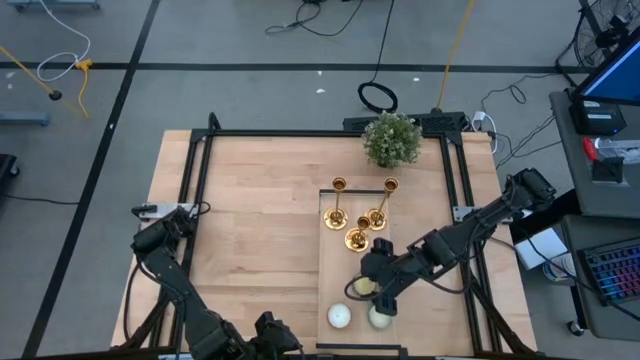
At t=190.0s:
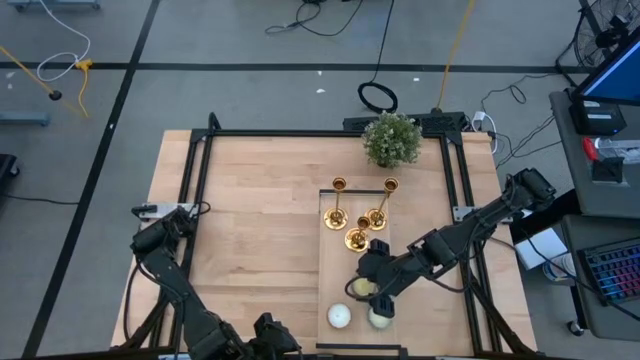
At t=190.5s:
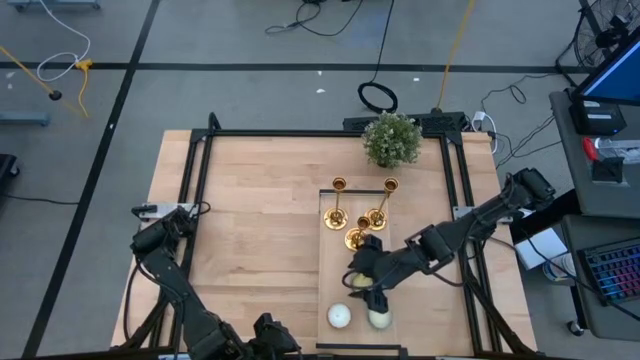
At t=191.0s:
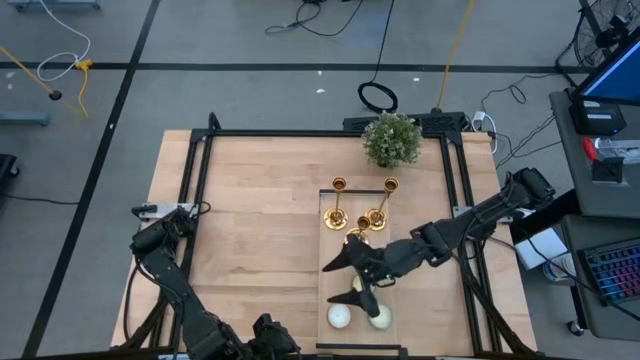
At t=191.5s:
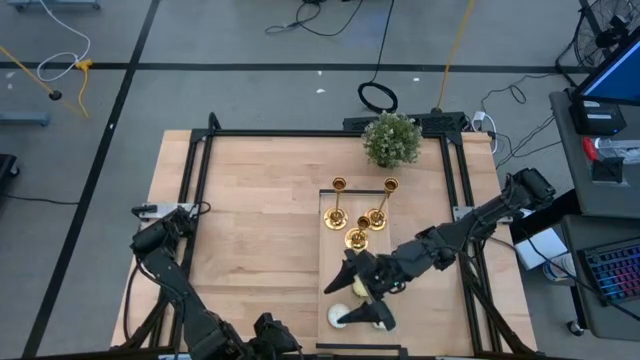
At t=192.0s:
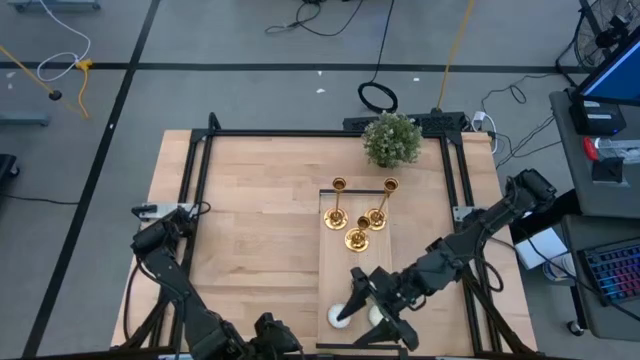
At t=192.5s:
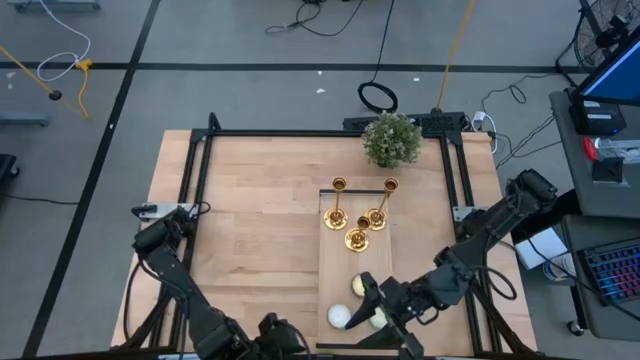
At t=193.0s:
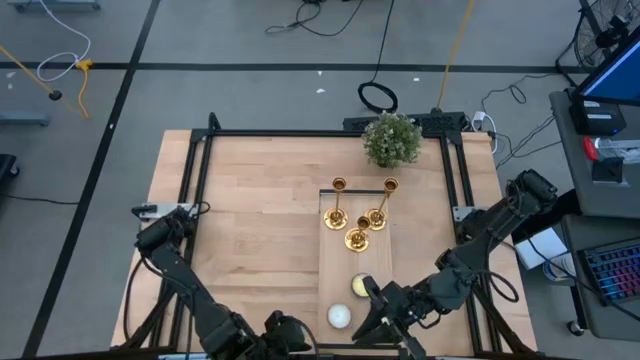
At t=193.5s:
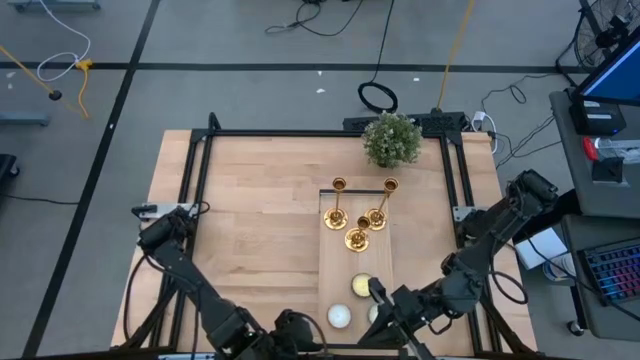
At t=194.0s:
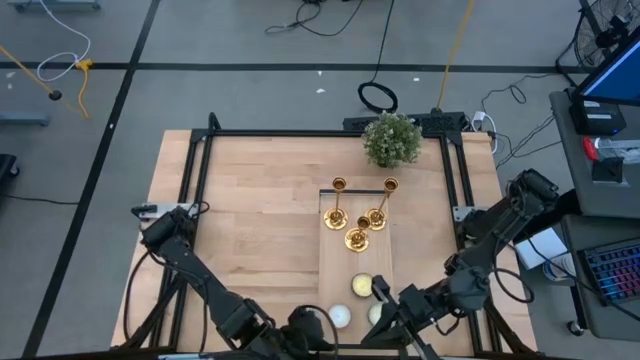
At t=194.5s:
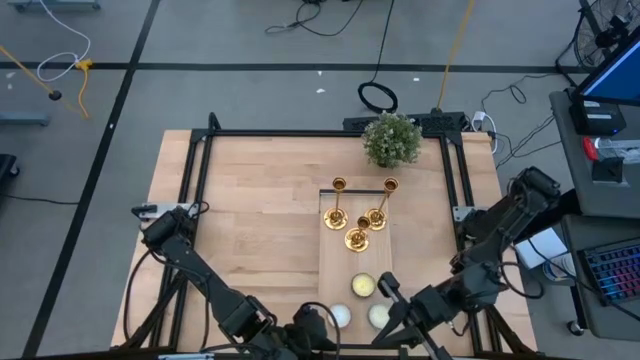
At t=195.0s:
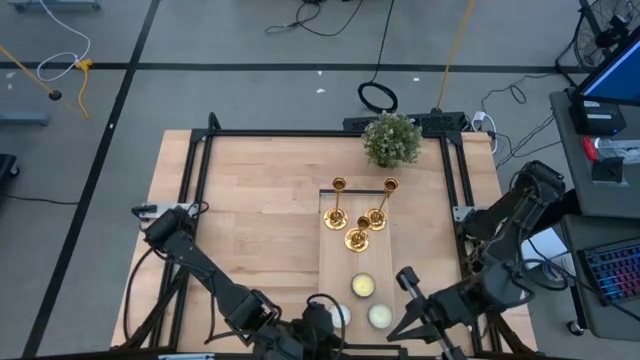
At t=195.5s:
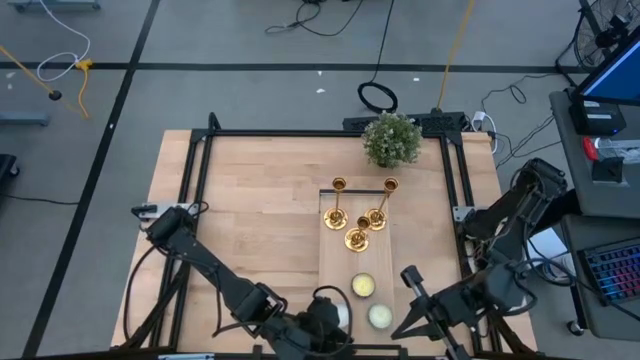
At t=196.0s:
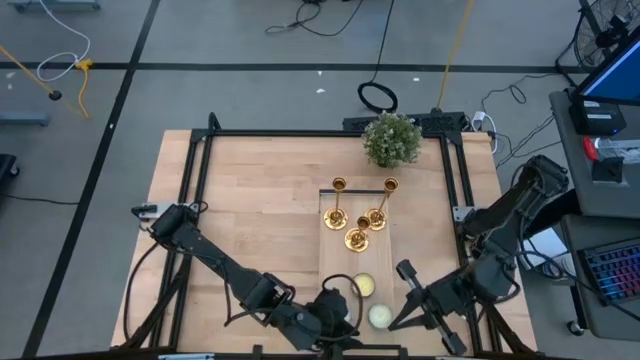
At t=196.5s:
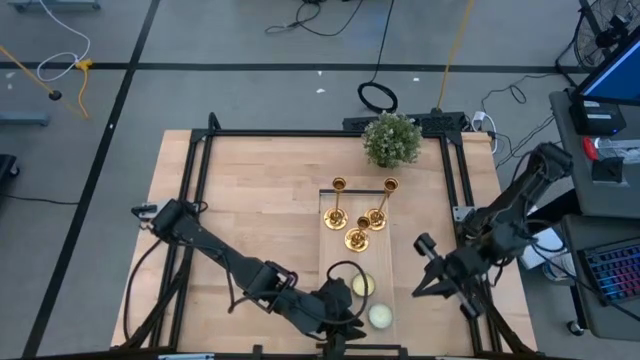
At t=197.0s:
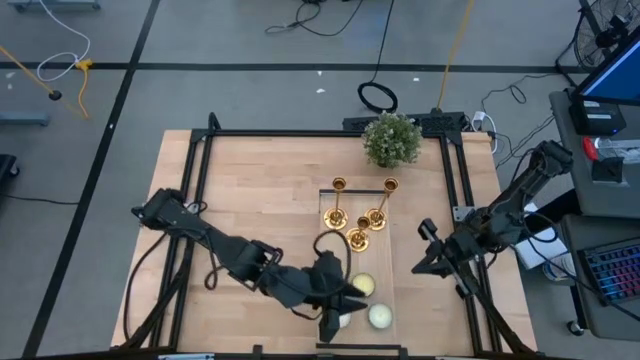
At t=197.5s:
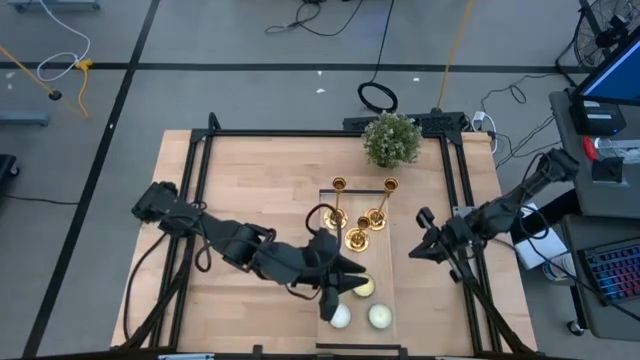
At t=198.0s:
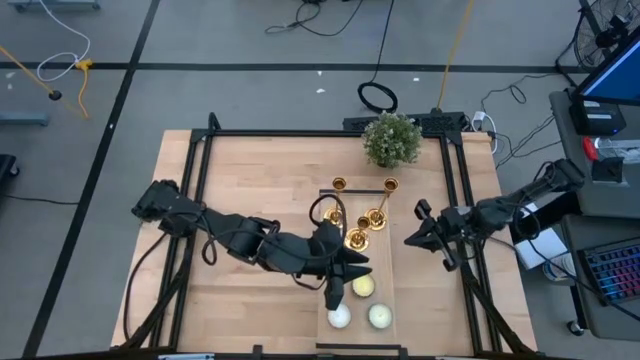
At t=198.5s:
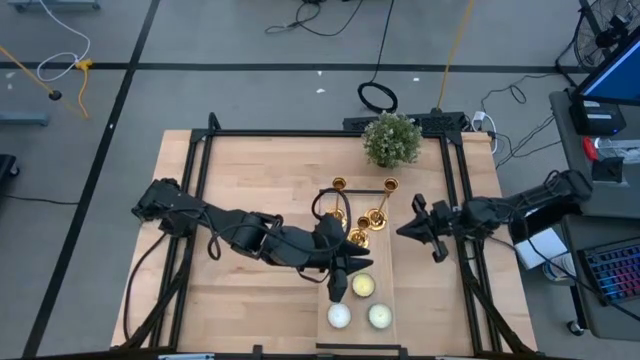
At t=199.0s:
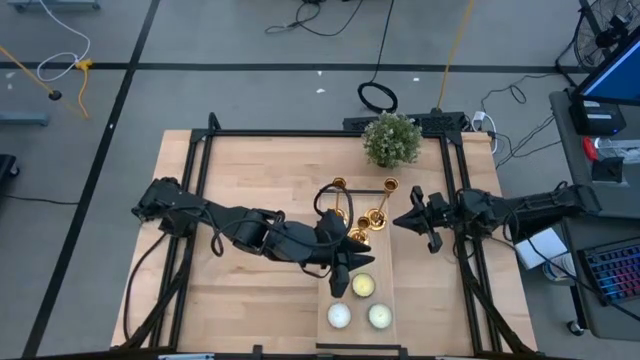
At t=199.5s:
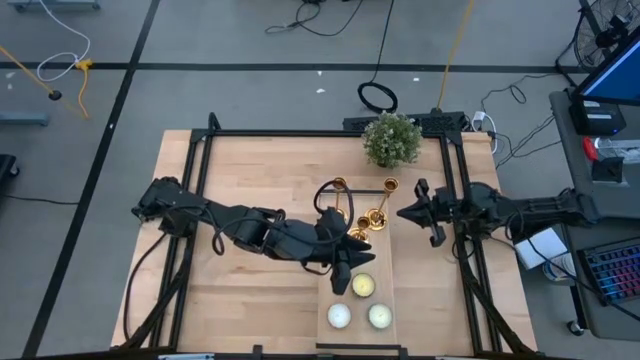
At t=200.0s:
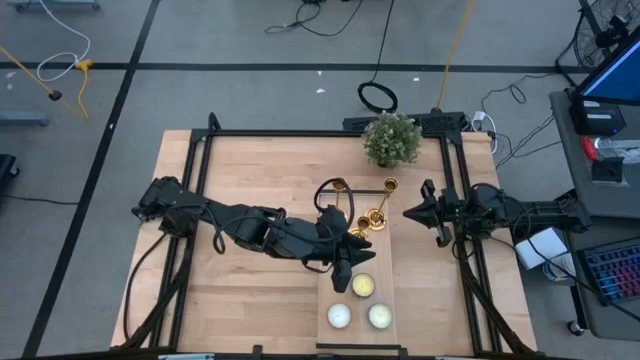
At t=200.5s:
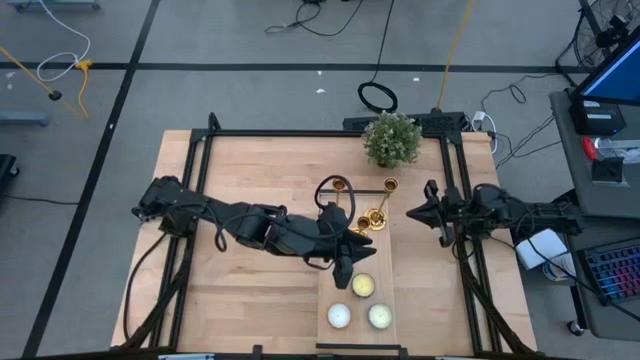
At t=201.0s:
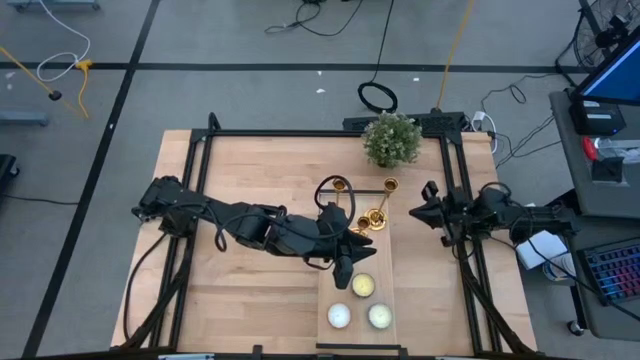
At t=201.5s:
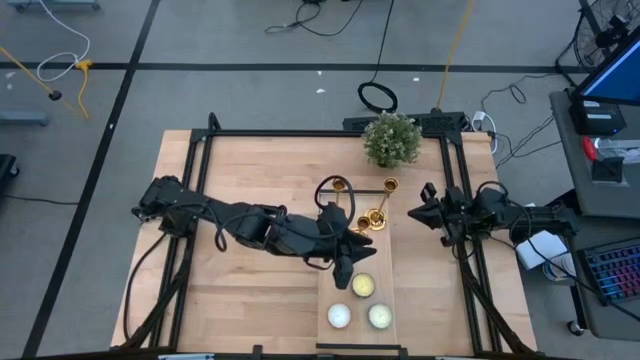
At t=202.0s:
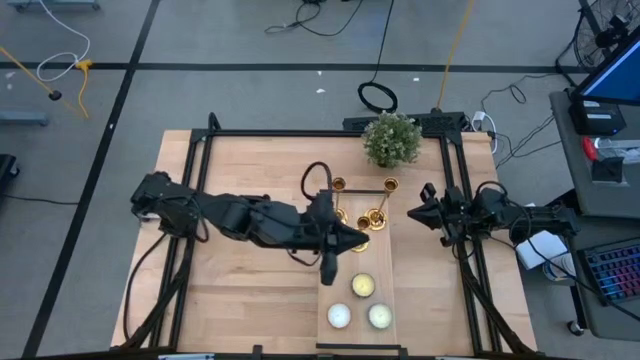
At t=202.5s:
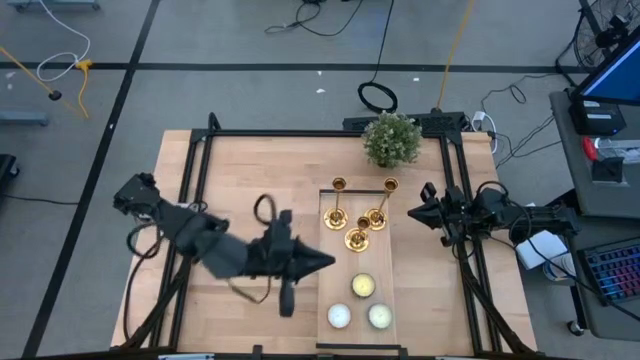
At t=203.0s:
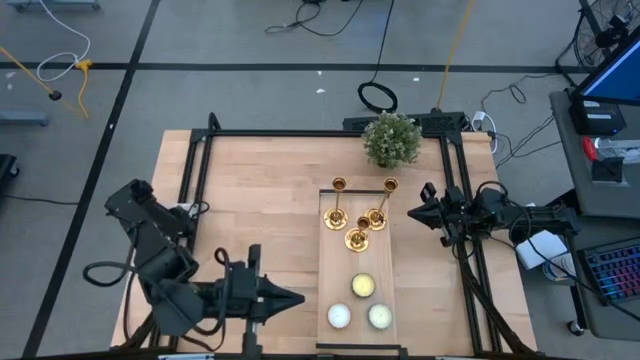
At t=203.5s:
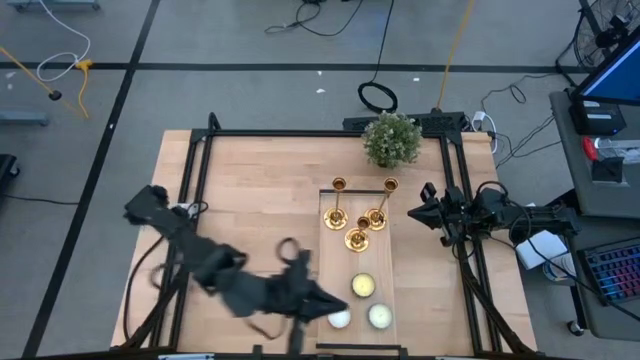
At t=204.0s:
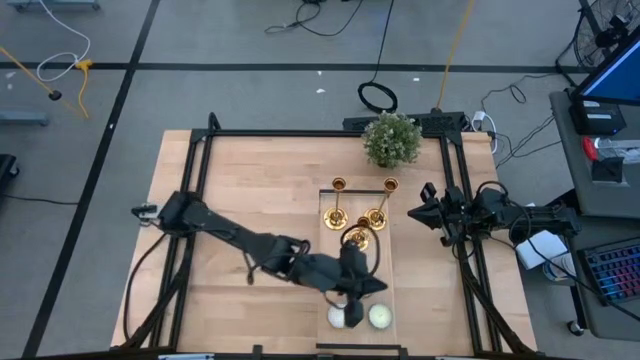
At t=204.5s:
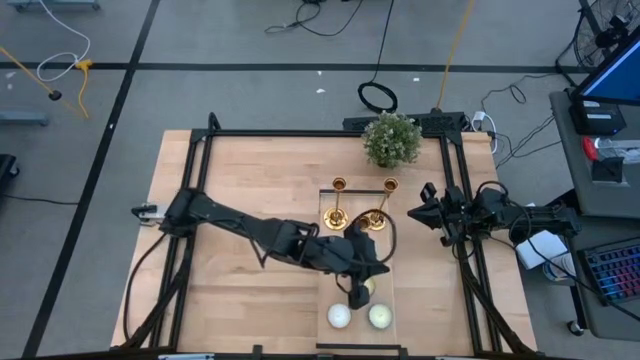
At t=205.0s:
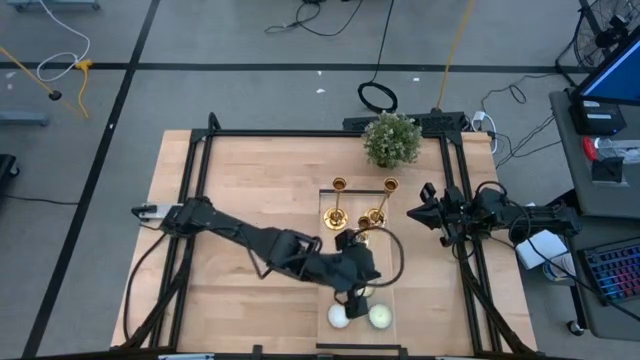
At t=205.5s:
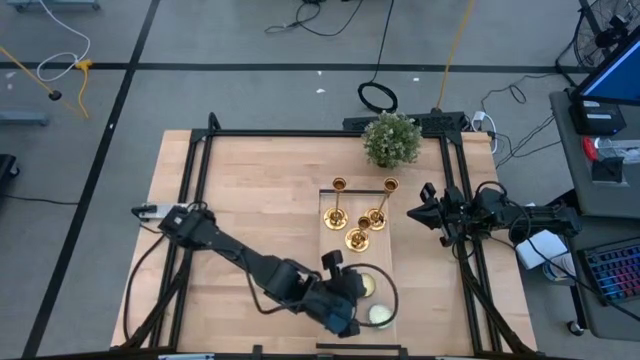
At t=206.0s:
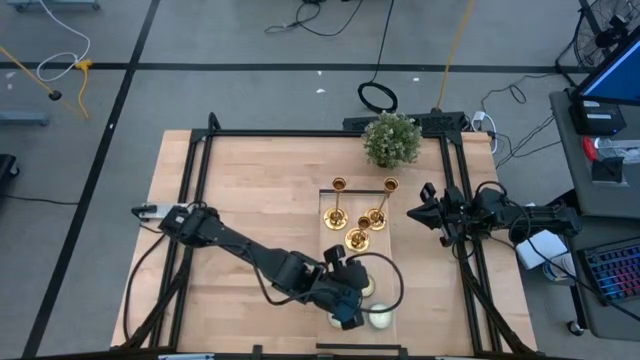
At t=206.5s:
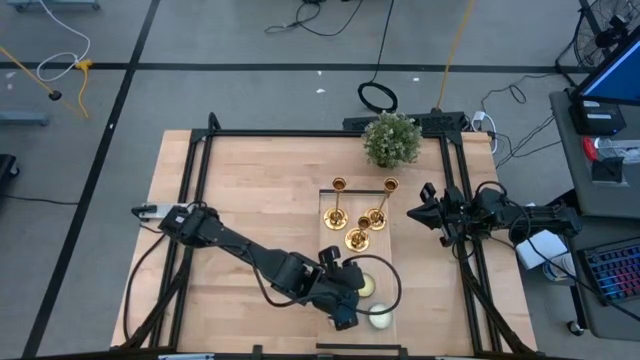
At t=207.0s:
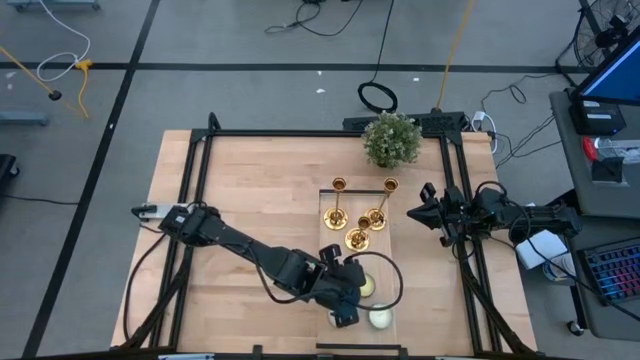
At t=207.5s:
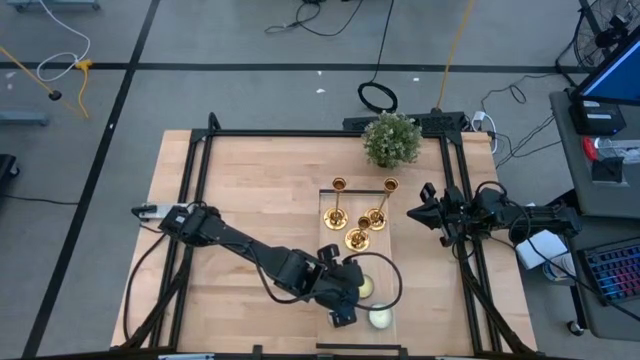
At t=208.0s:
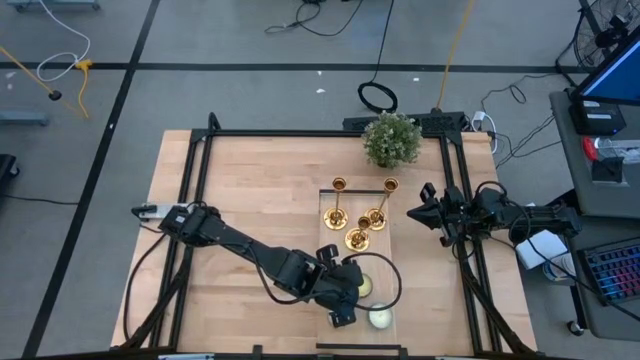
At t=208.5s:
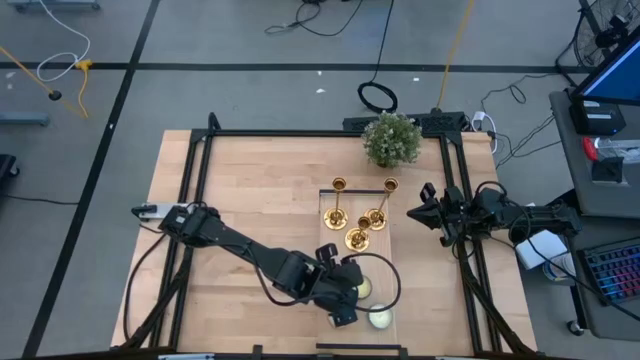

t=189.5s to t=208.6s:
Task: Pick & Place candle stick holders
Put the red patterned scented candle on the shelf

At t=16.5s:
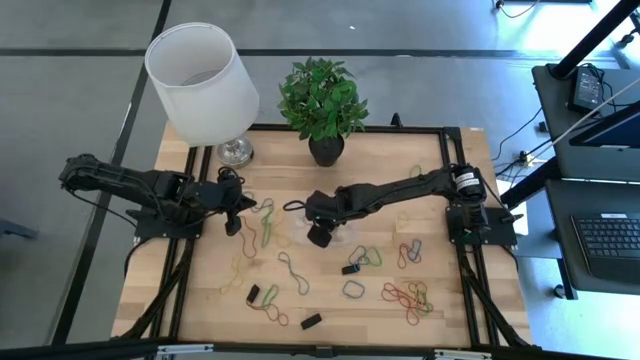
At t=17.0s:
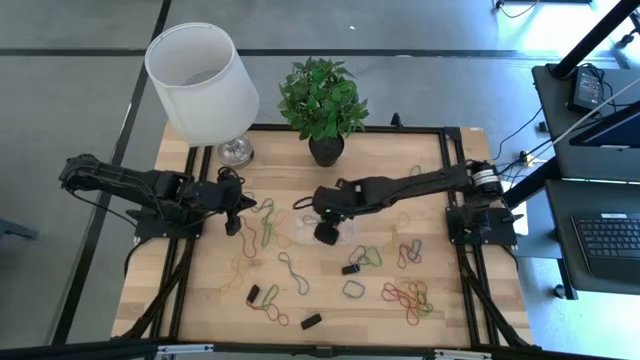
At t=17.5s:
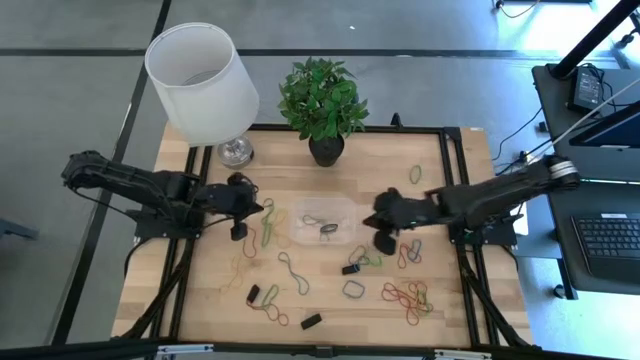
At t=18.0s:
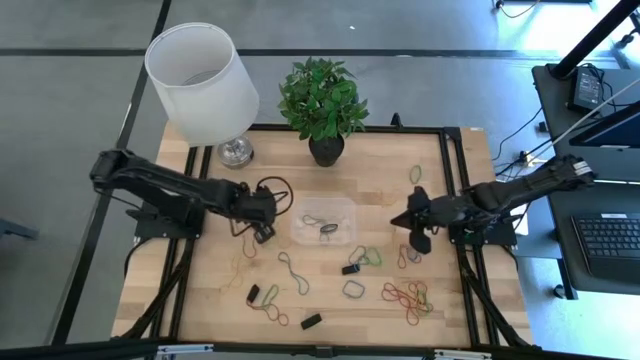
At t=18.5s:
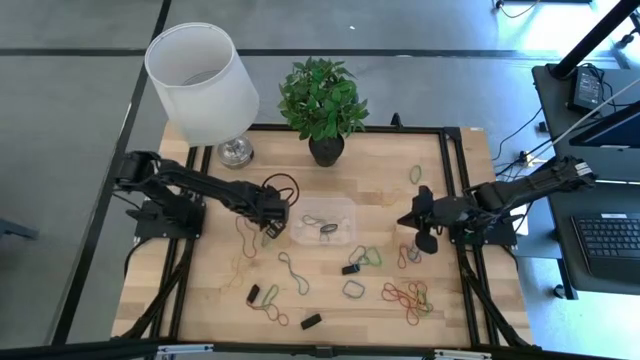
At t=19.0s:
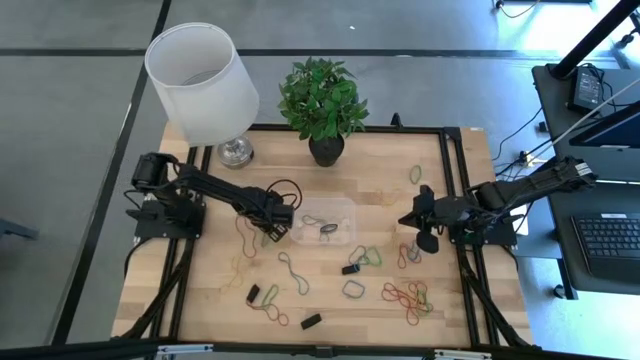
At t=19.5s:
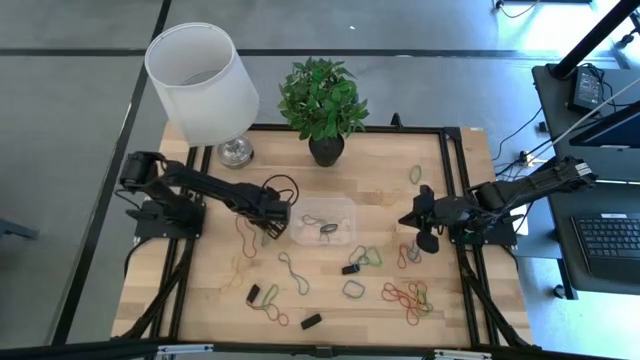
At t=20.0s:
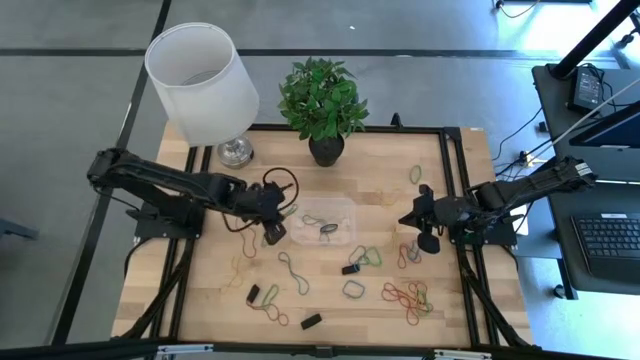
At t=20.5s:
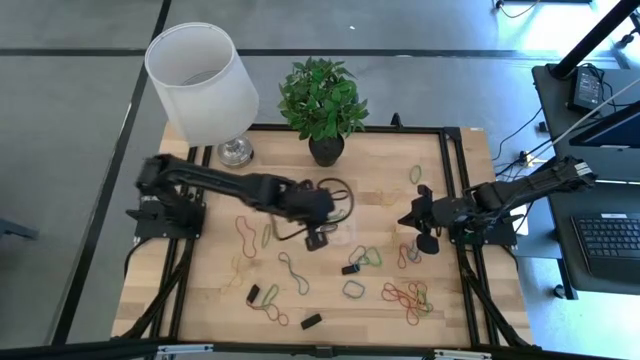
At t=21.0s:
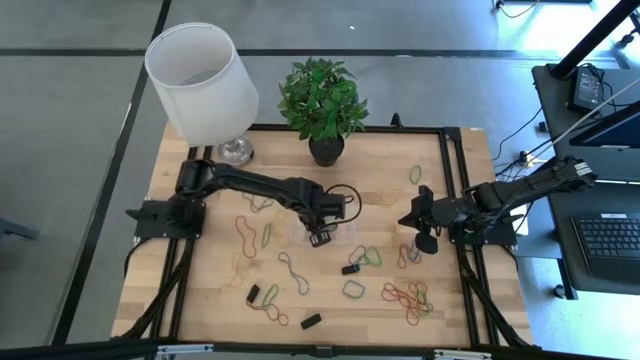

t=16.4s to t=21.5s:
Task: Pick and place rubber bands into bin
Put the green rubber band into the transparent container
